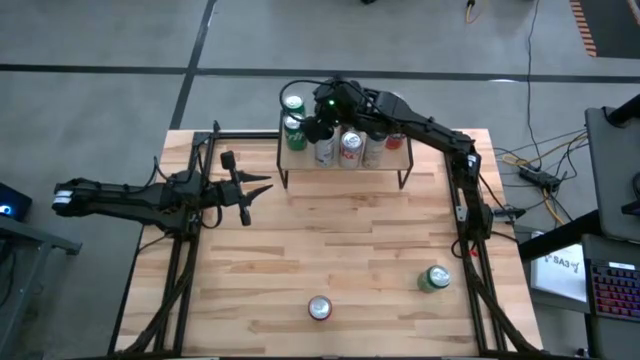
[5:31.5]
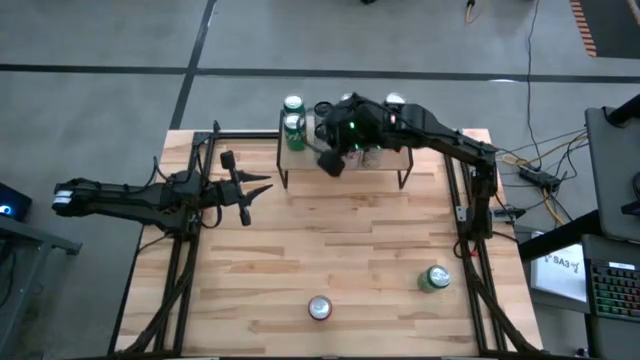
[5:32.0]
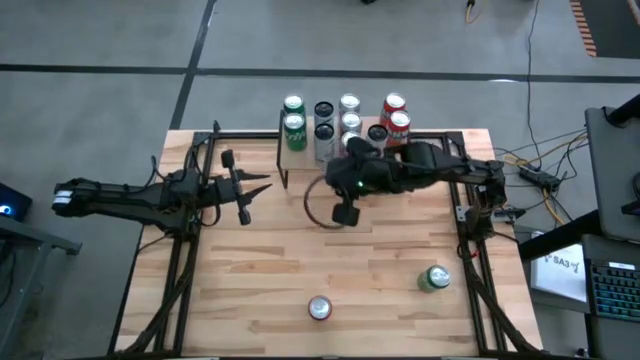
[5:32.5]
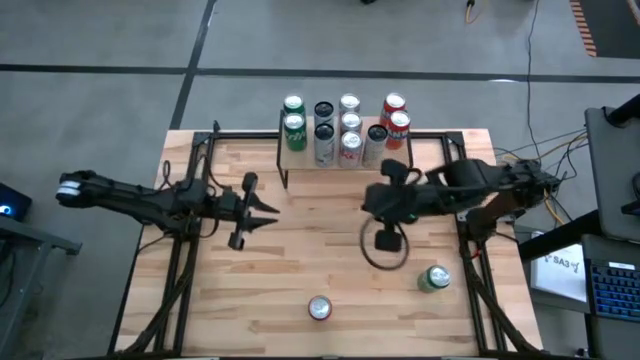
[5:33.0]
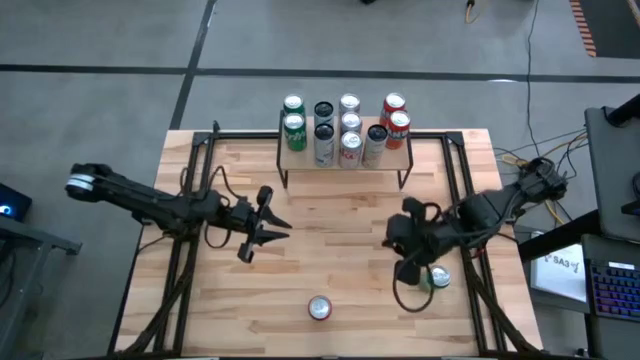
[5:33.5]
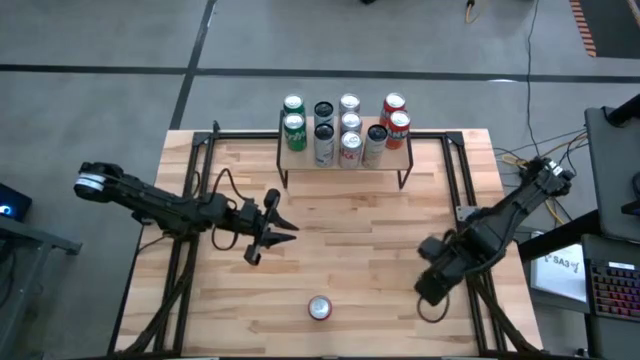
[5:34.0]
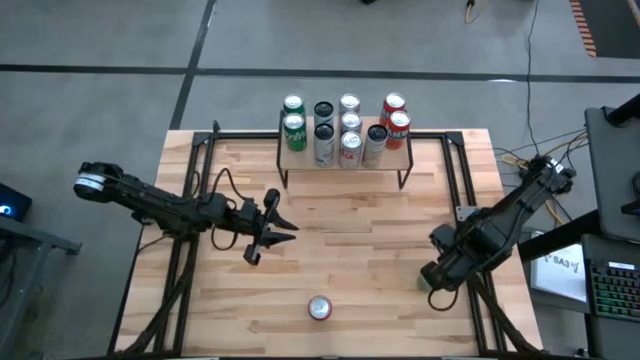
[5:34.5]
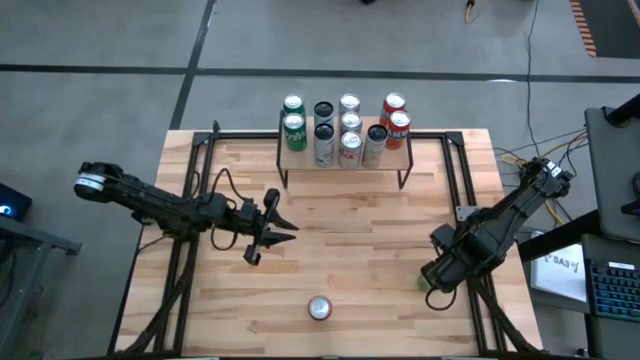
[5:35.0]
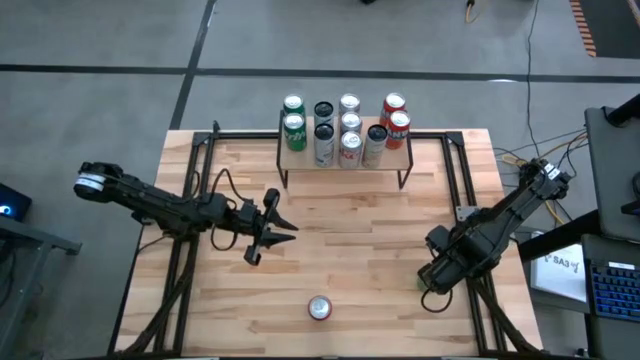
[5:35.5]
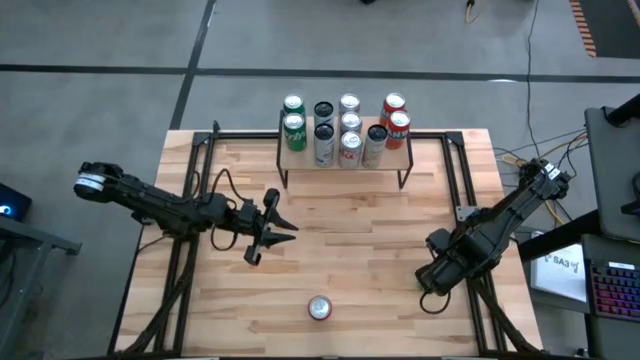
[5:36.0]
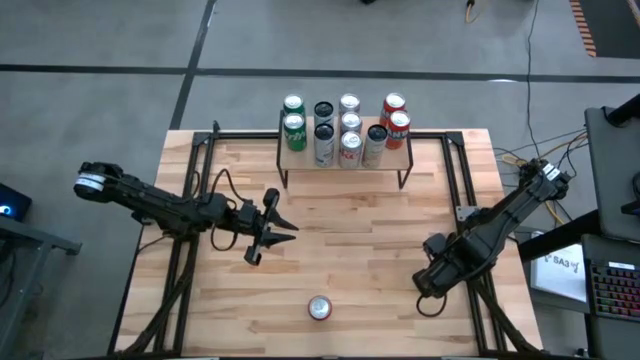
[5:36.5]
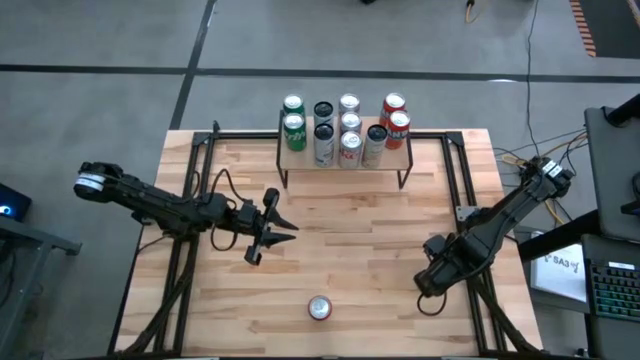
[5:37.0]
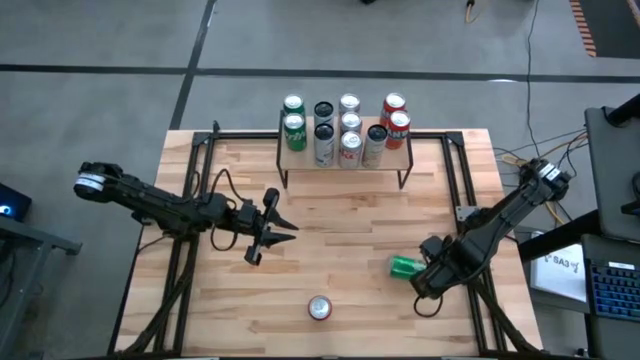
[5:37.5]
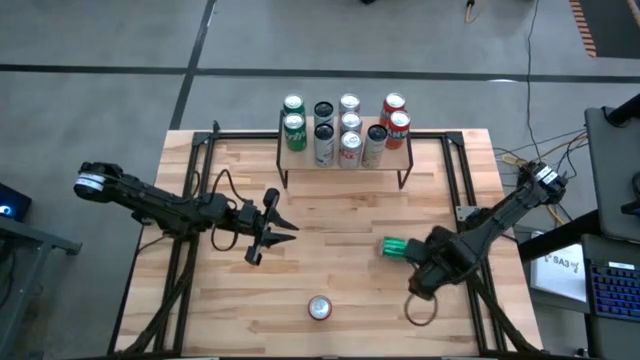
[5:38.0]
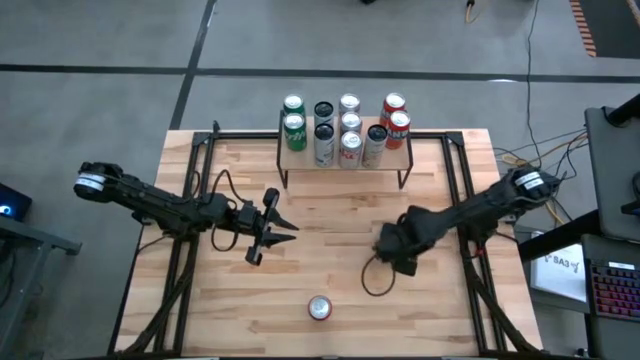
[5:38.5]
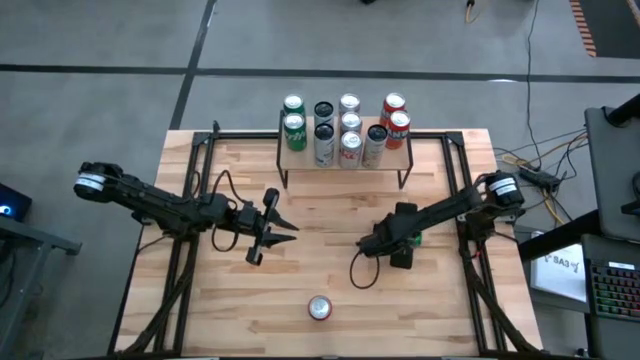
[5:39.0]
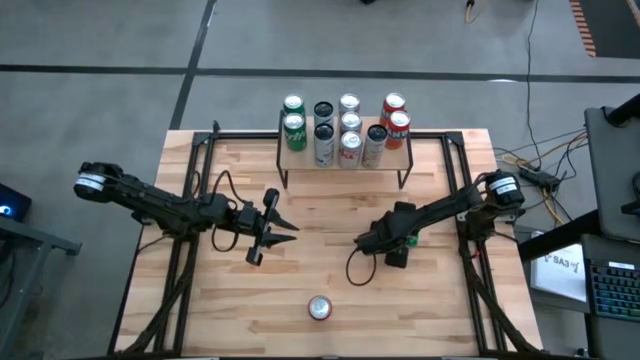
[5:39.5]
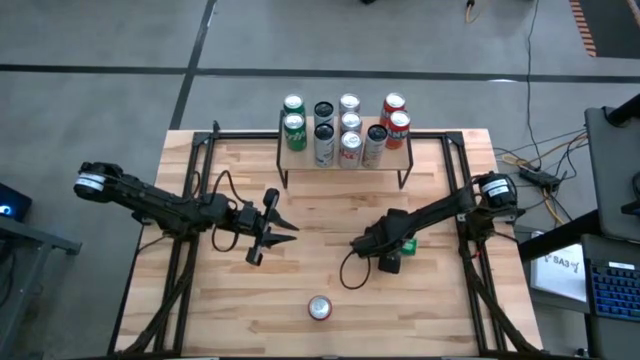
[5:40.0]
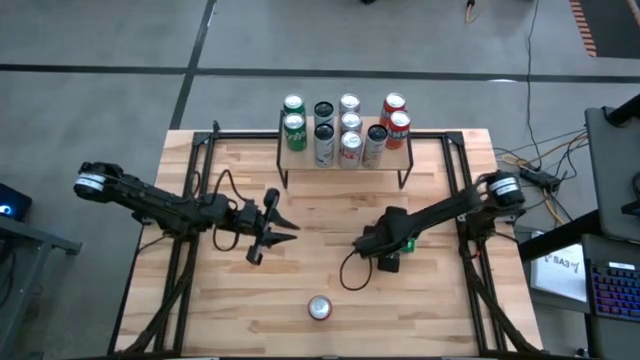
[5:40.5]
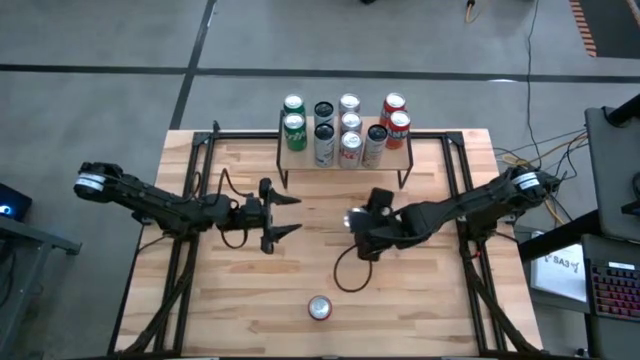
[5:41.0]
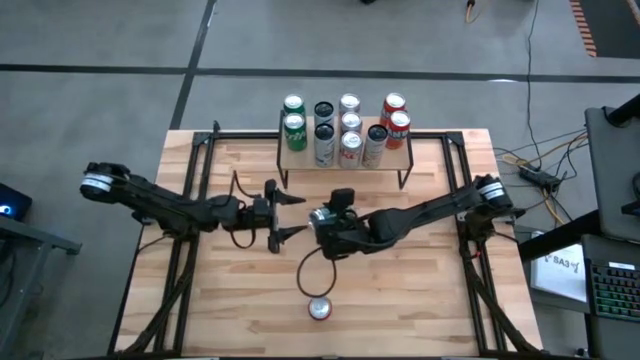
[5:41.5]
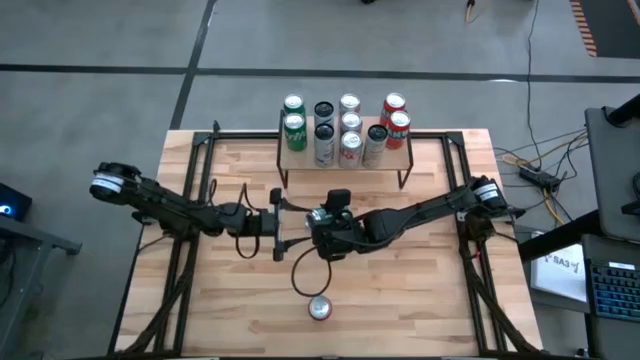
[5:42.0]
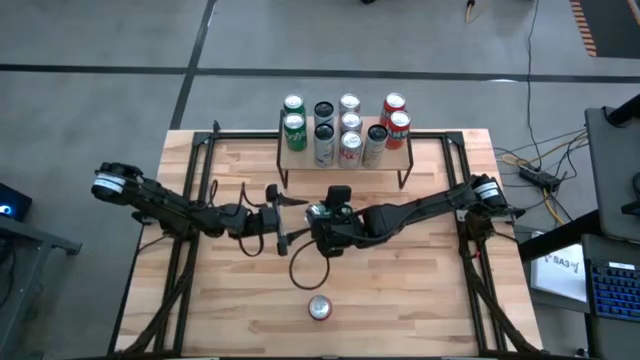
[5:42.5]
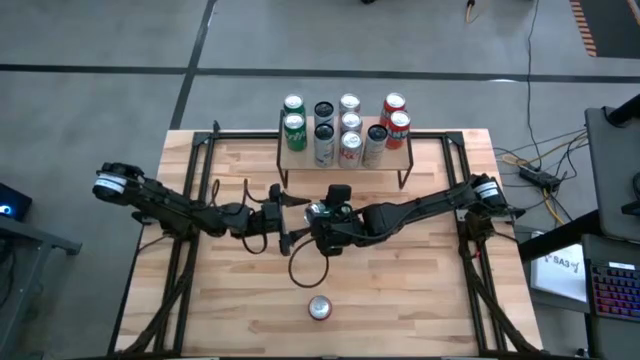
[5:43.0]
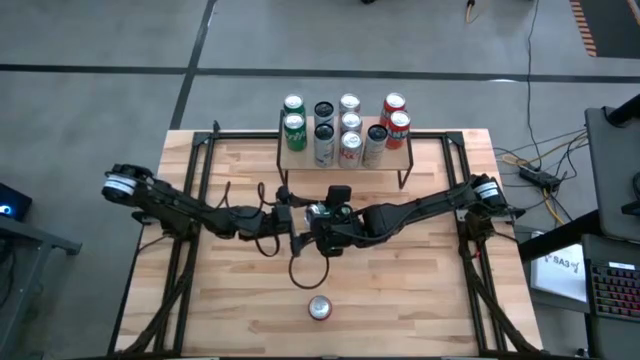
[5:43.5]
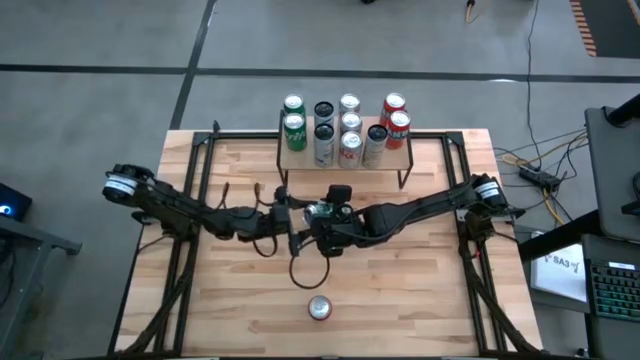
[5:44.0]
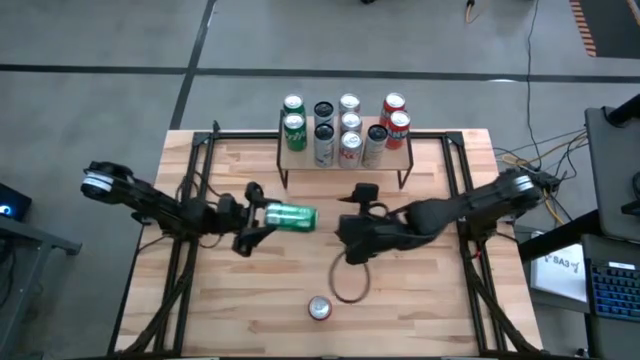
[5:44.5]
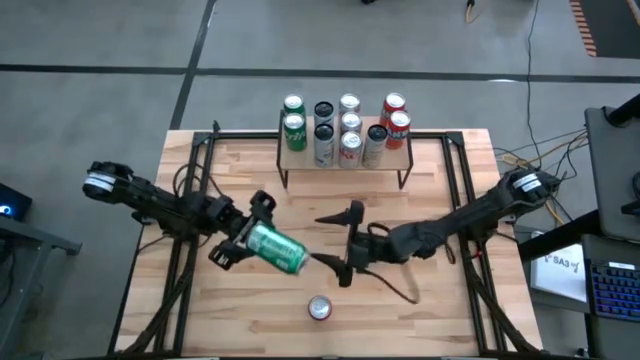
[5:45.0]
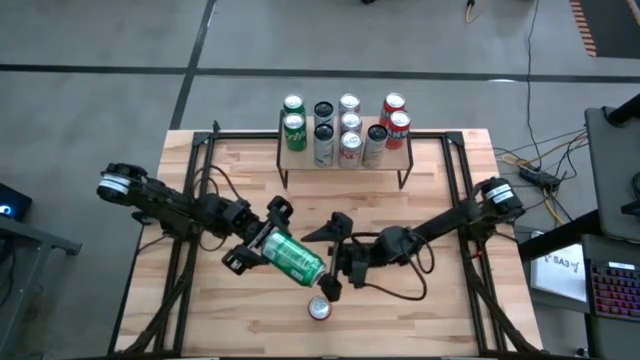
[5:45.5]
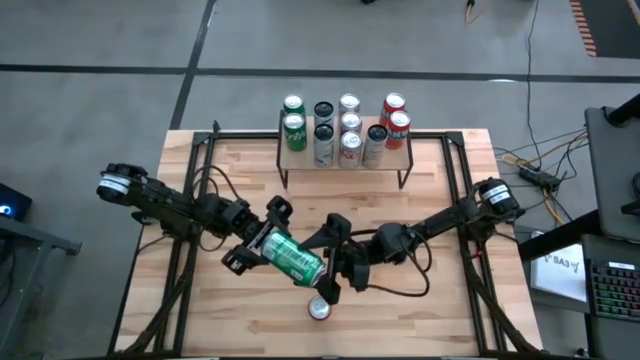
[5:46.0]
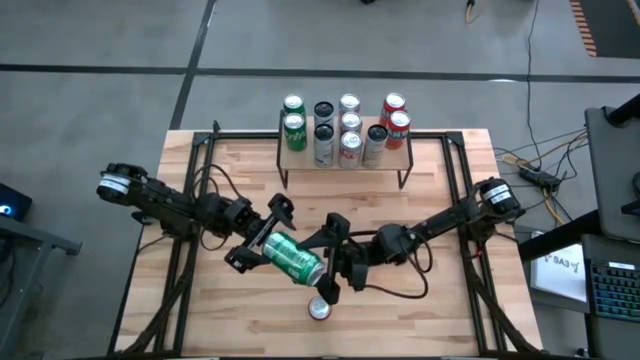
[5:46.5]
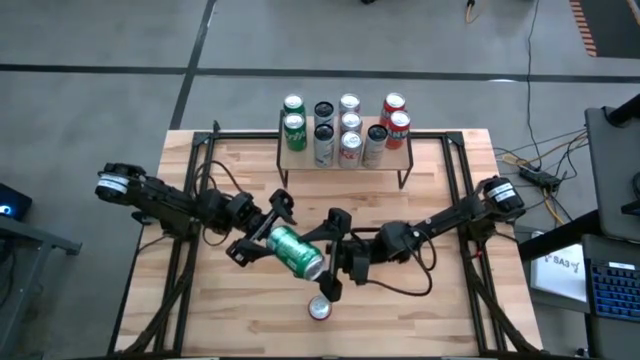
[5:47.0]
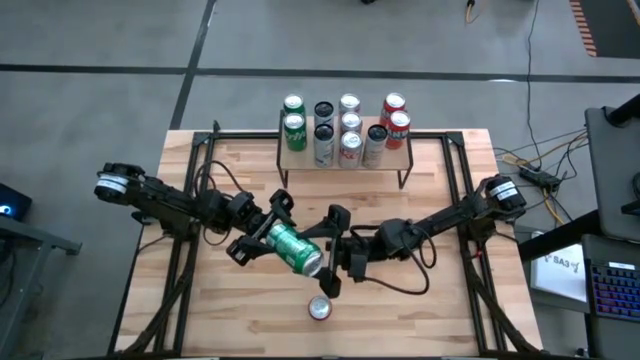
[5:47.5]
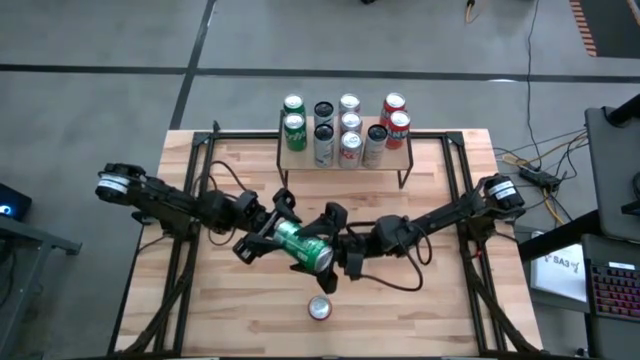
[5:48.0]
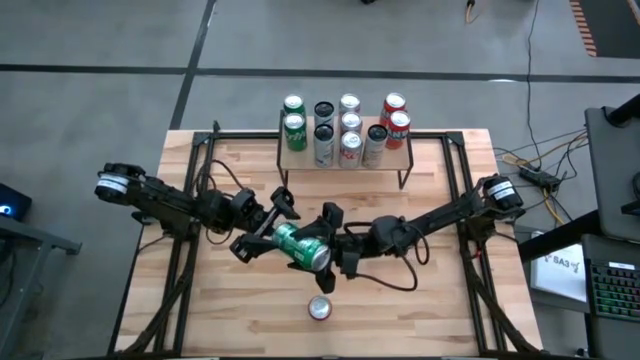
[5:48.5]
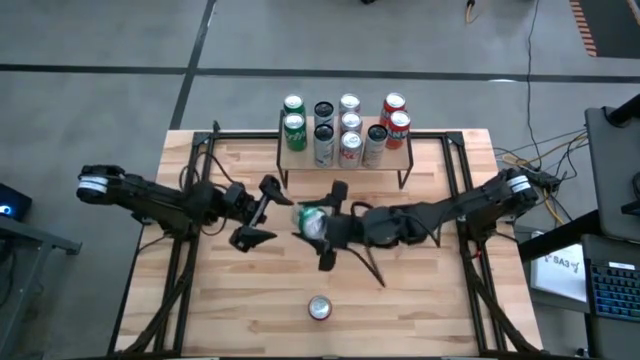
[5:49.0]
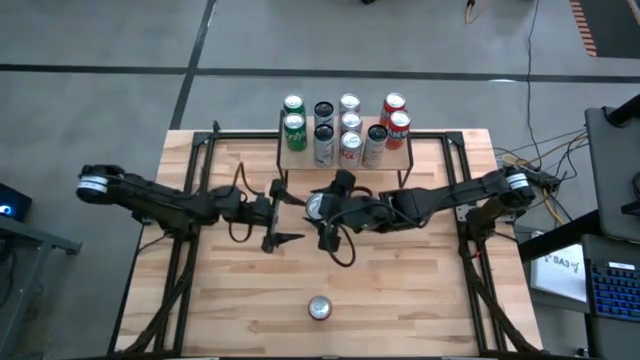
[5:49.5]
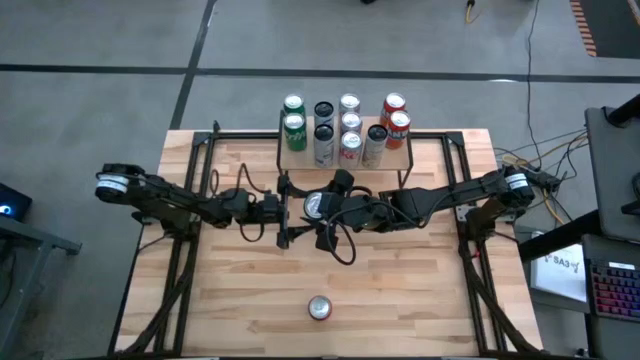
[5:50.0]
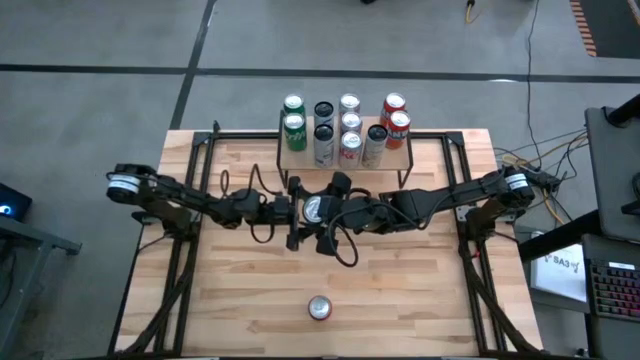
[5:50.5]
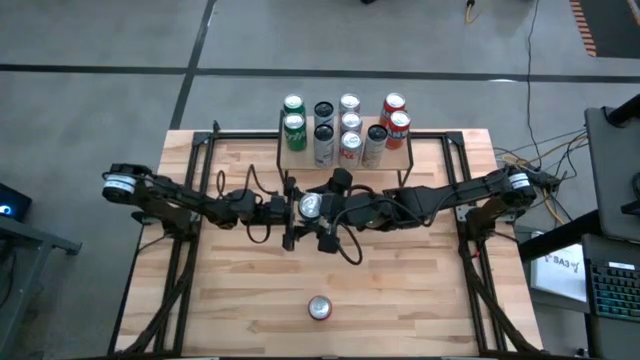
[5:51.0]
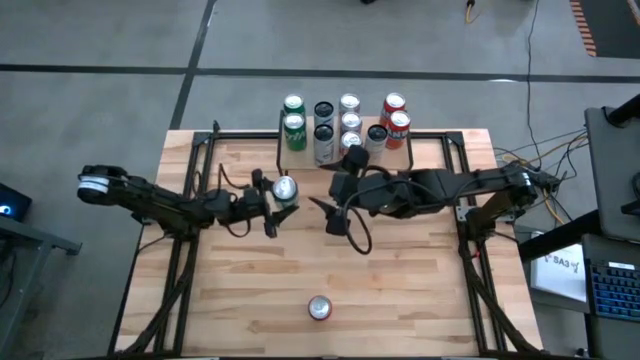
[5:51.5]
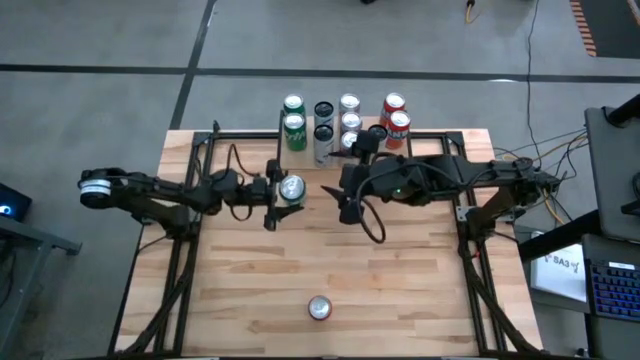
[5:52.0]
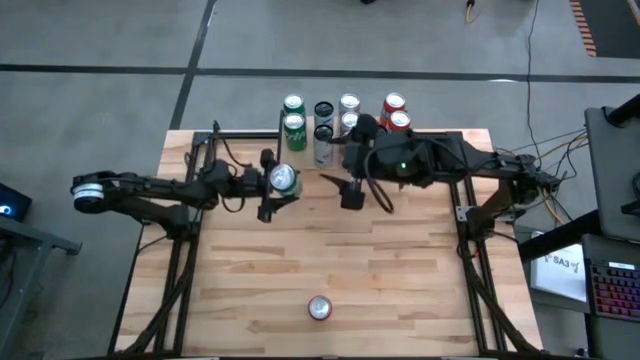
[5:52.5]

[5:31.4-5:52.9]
Task: Place canned beverage on shelf
Put the green soda can on the shelf aligned with the other green soda cans
